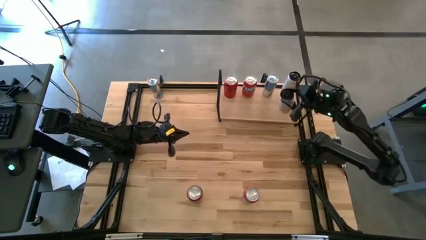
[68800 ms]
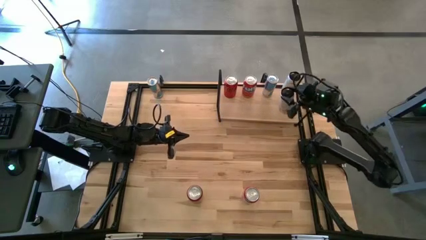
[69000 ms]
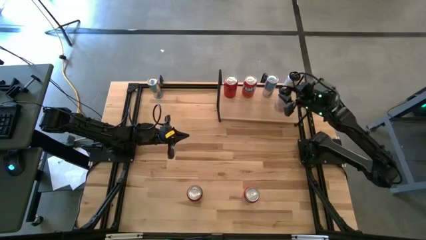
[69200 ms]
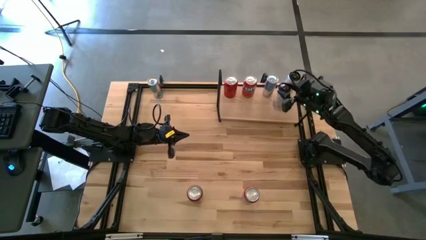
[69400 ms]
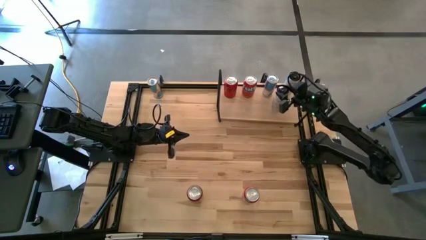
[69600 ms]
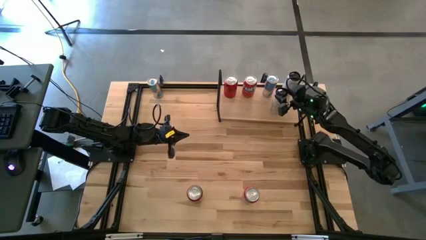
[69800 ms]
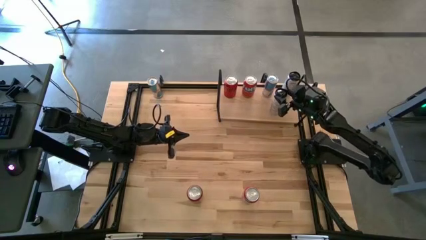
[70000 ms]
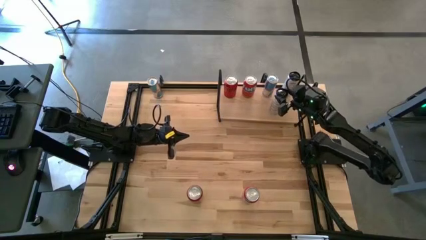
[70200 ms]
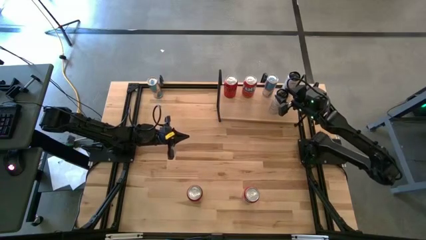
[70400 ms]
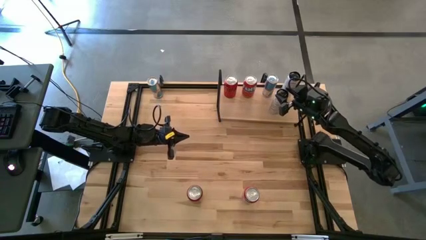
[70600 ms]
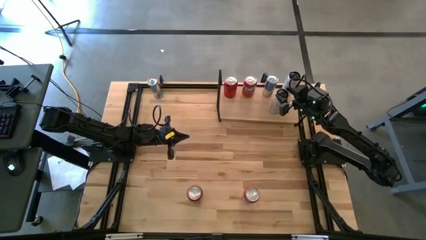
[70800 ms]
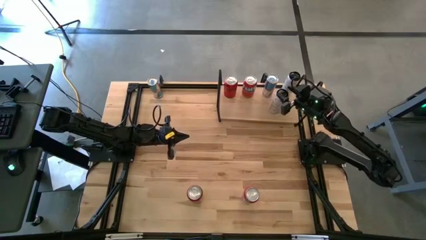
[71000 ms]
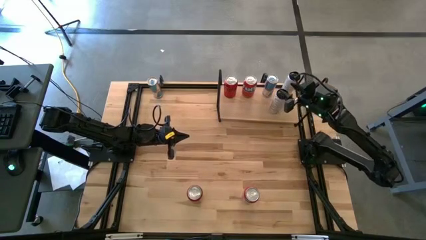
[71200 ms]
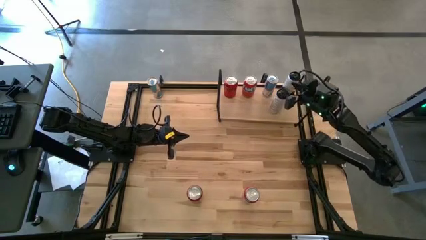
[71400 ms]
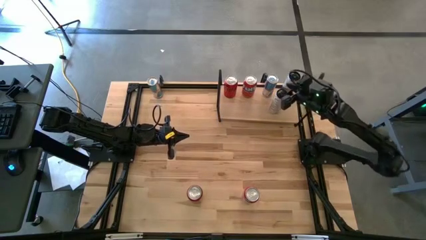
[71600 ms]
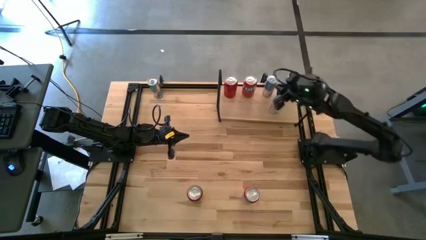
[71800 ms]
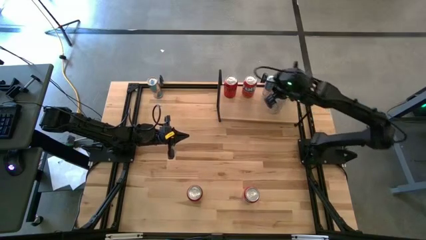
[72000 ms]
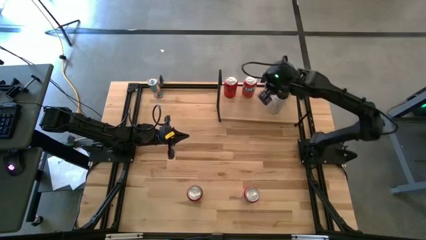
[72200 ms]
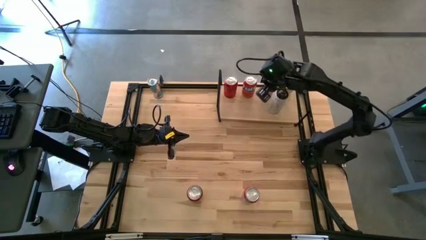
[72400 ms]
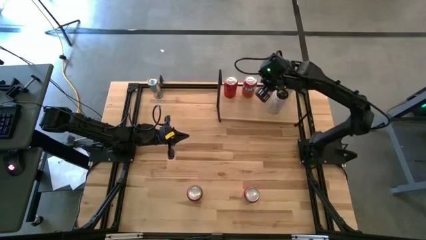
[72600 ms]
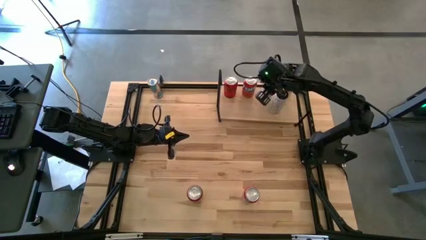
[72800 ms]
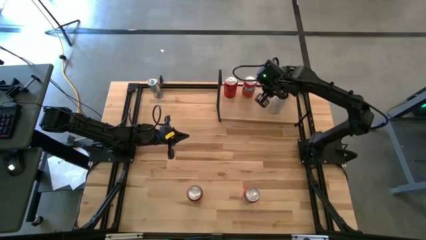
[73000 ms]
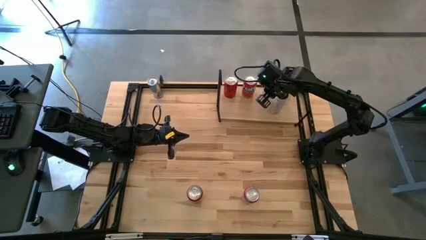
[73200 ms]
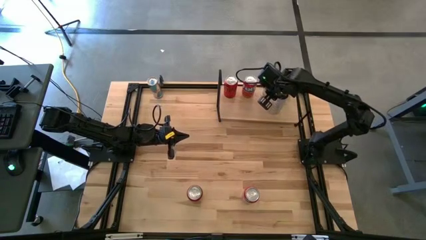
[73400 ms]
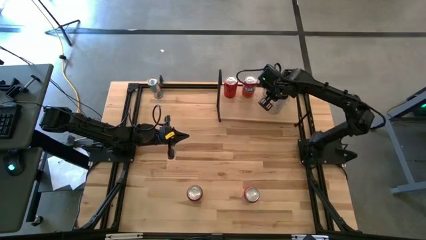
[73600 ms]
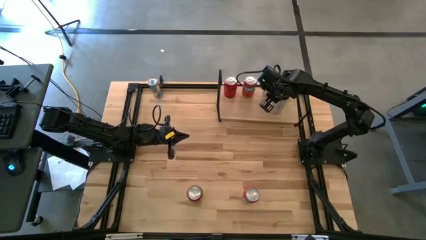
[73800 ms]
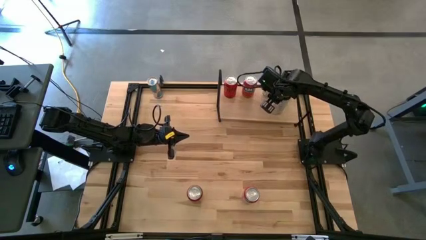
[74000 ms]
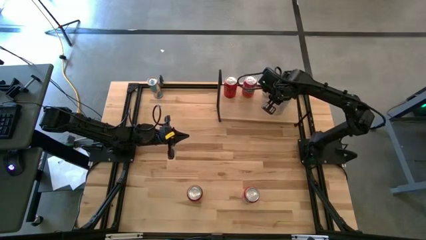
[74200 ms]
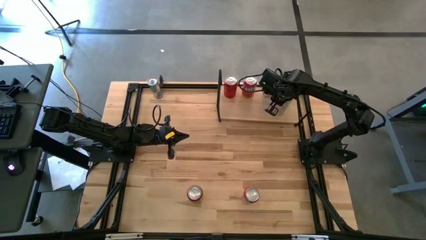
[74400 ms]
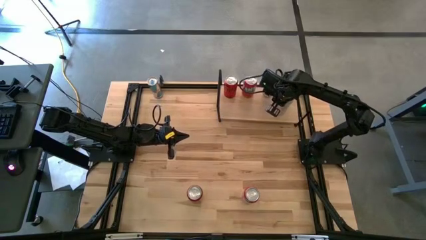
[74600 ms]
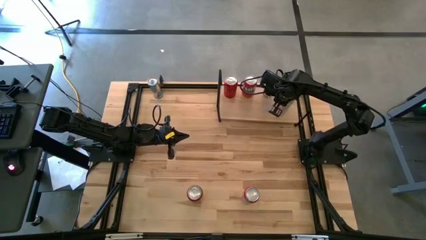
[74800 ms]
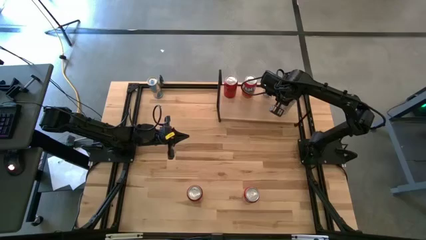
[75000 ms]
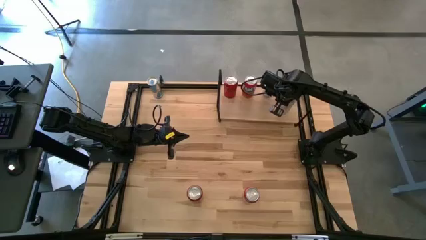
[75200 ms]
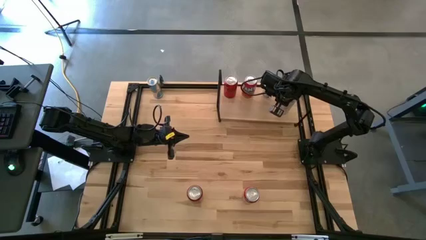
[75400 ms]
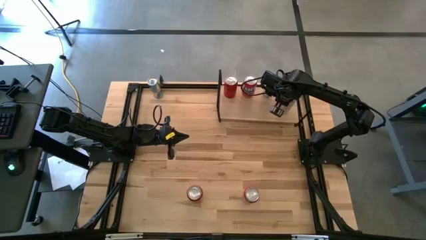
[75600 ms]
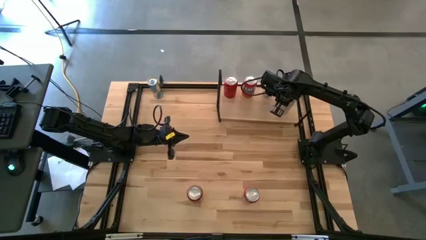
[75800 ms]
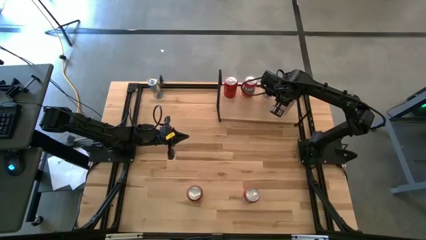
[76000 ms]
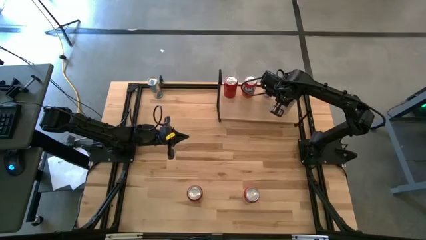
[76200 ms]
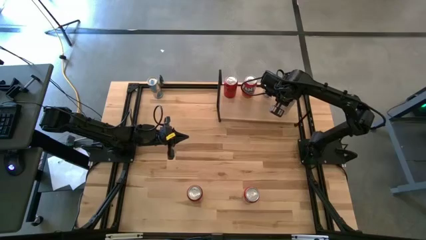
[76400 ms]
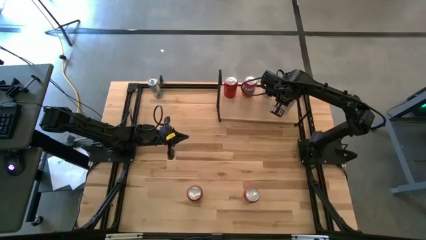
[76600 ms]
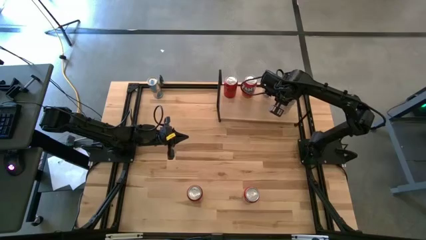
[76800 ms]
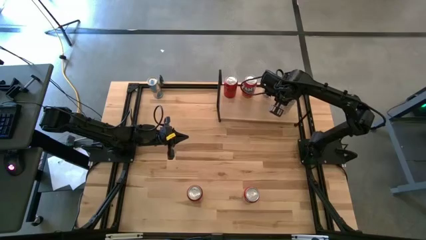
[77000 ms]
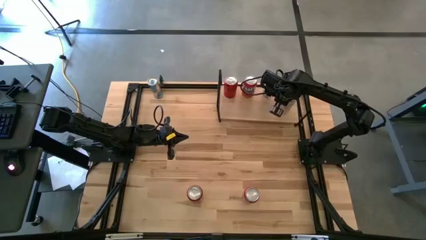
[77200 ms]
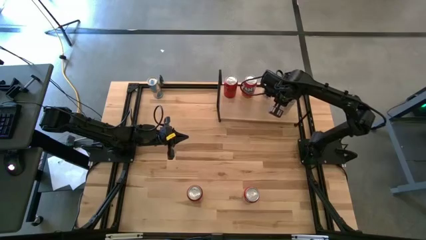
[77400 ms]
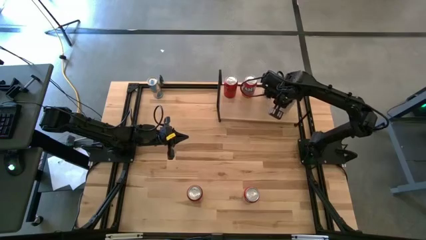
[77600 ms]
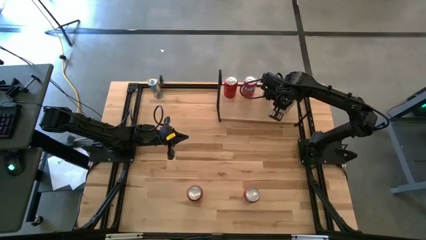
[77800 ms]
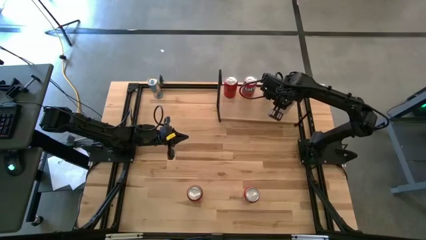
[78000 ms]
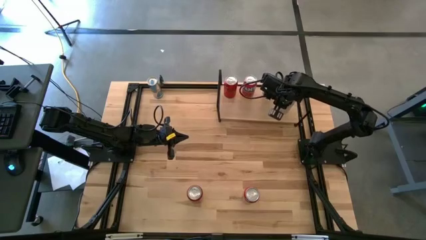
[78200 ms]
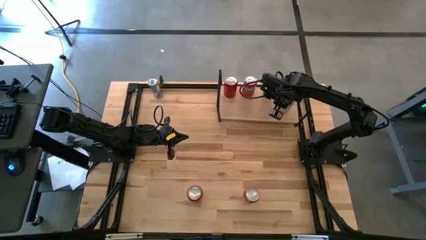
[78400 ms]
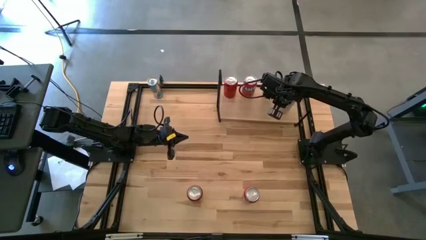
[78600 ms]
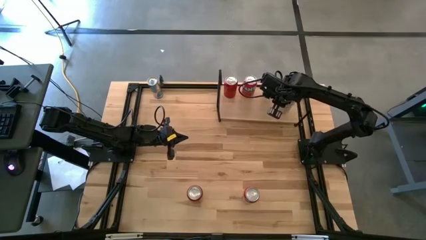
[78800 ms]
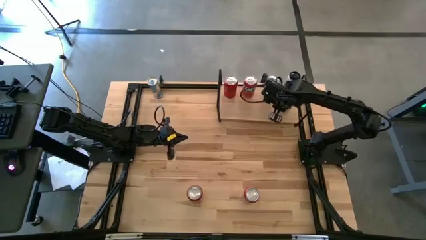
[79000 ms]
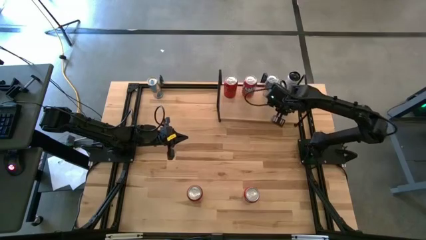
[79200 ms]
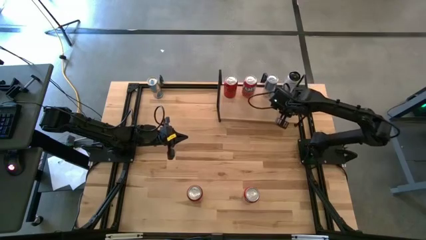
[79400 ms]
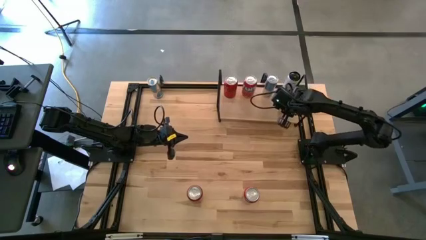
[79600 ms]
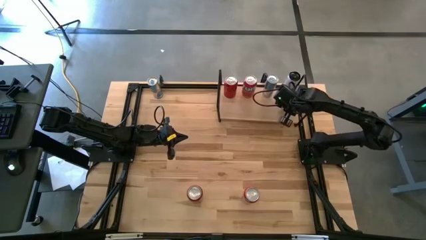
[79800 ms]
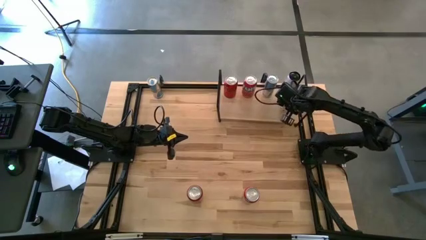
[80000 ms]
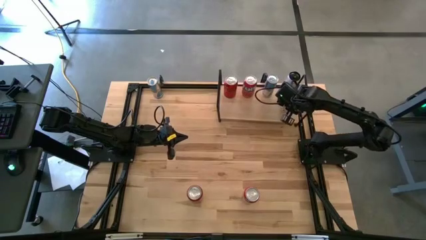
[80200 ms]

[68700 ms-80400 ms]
Task: Place canned beverage on shelf
Put the white-yellow soda can on the shelf aligned with the other white-yellow soda can

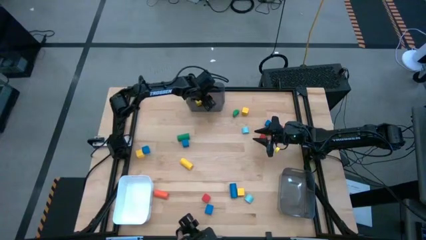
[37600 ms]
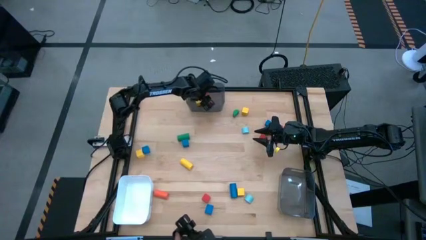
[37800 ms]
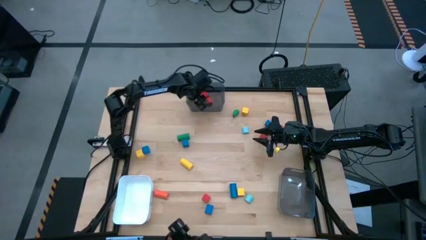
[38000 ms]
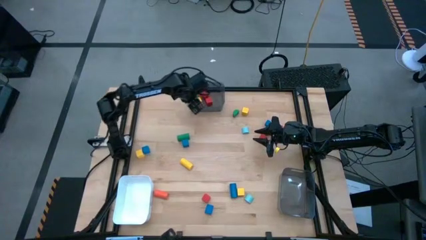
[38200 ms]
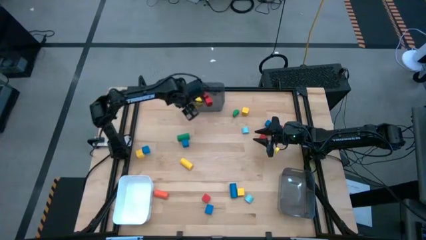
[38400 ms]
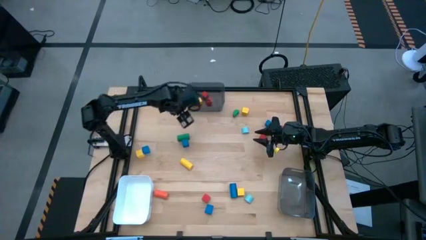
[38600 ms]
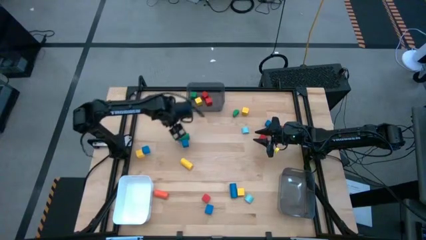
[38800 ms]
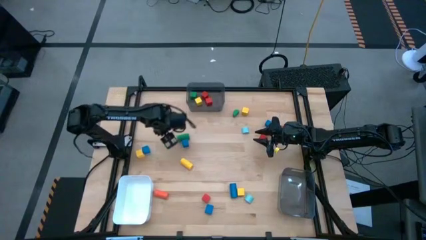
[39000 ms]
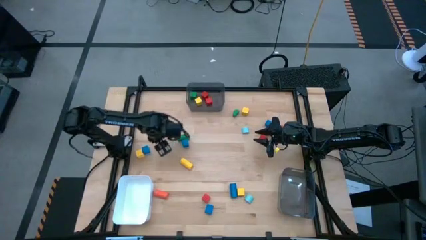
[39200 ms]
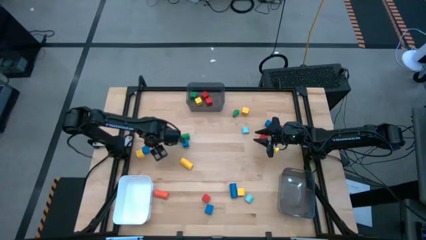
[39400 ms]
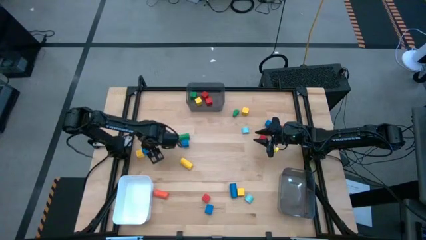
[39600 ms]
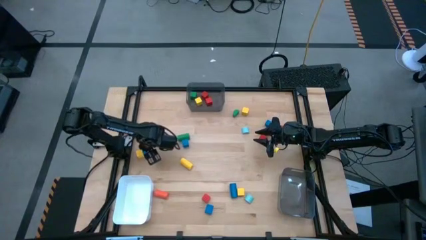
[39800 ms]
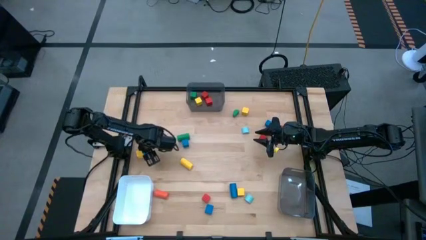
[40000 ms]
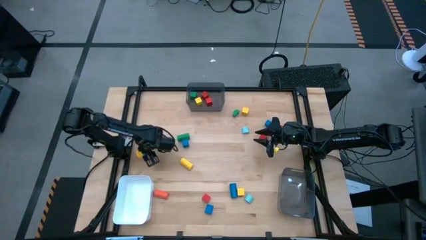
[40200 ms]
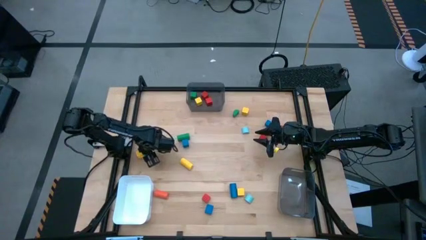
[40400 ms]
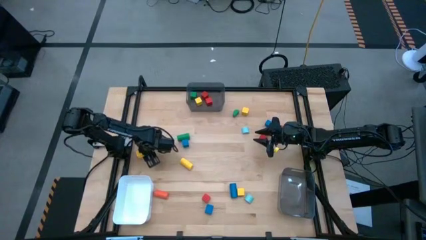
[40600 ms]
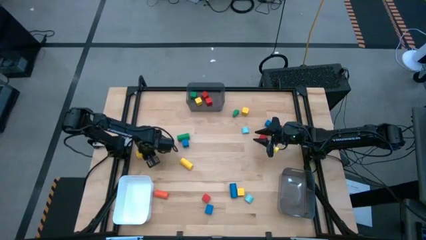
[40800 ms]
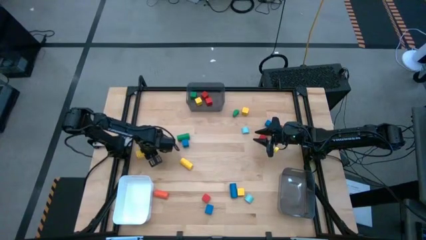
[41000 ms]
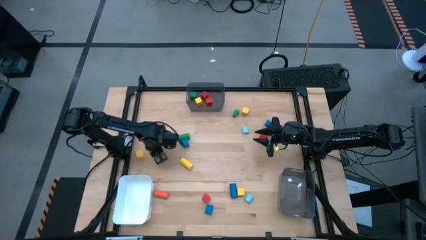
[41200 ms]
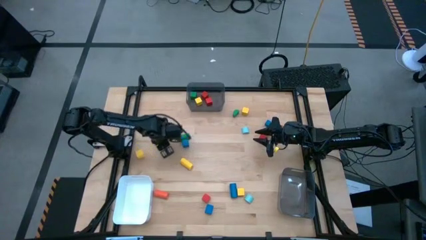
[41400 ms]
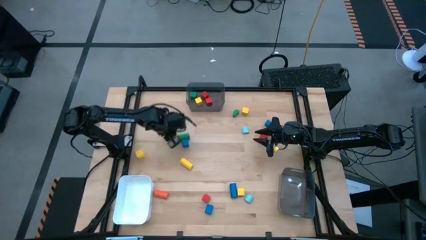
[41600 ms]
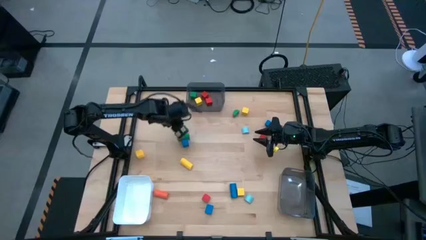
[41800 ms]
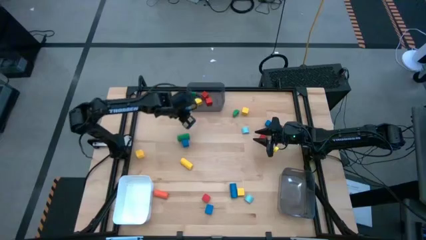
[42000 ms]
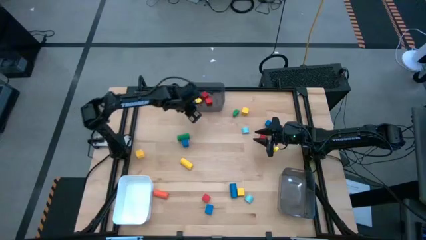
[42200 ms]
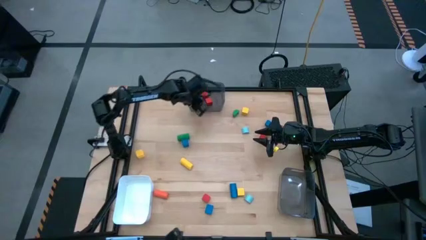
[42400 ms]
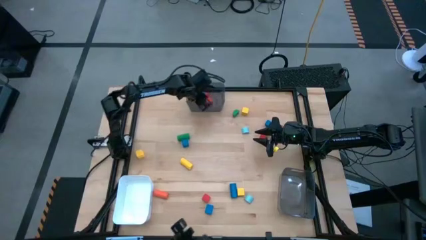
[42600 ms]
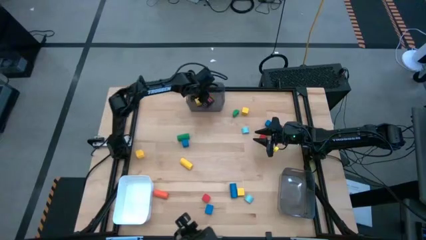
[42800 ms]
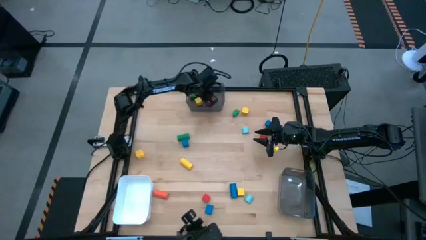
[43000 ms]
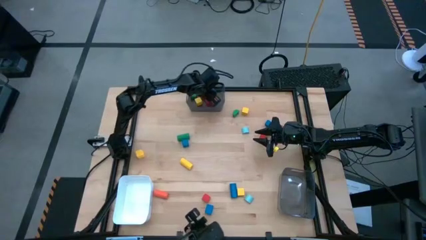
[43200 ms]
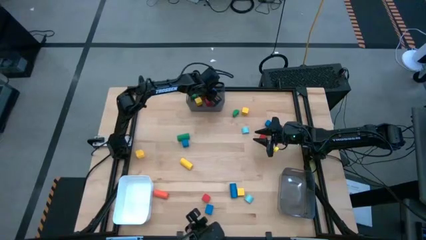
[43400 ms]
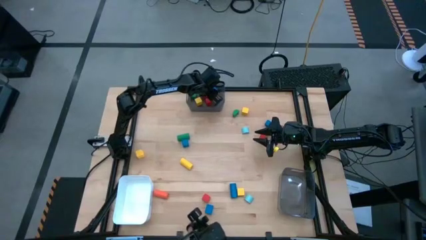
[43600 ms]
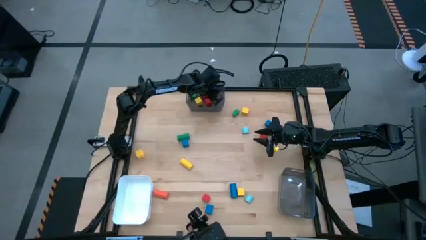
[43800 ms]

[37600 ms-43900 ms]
Task: Sort blocks by size
Put the blue square block into the top black bin
